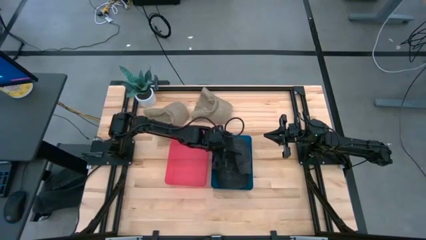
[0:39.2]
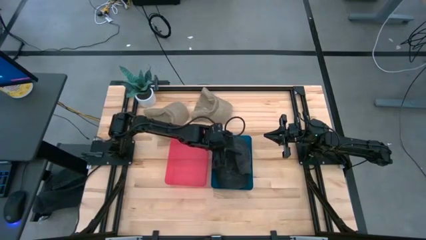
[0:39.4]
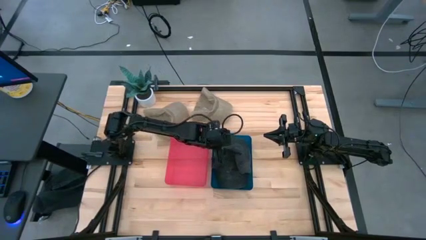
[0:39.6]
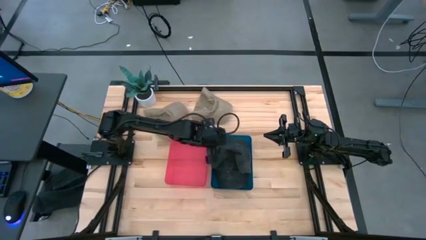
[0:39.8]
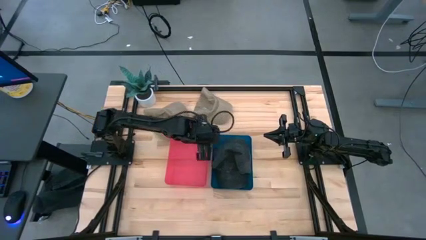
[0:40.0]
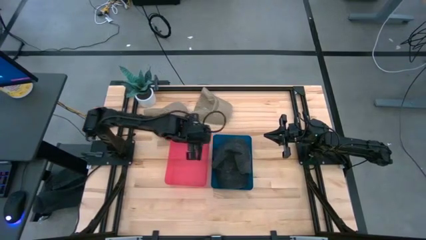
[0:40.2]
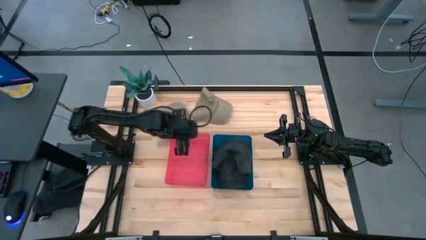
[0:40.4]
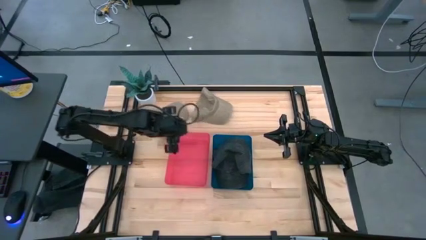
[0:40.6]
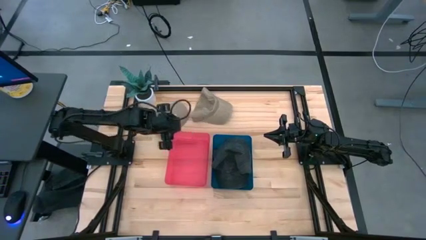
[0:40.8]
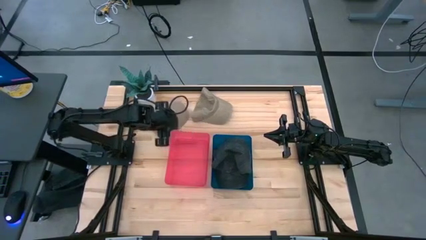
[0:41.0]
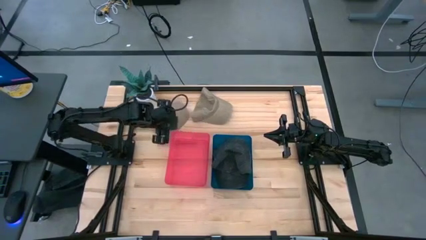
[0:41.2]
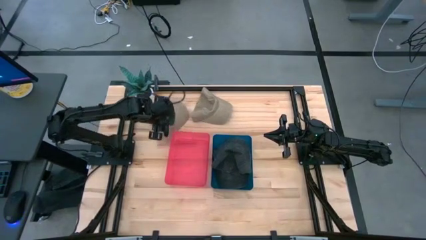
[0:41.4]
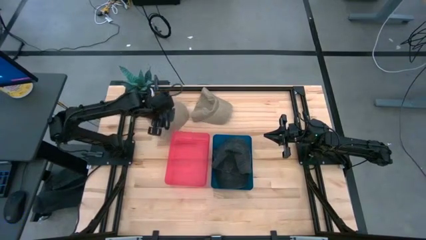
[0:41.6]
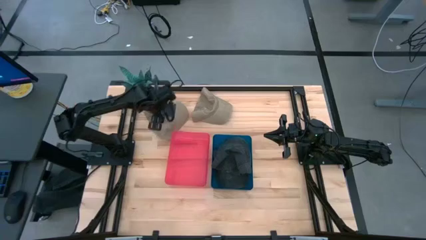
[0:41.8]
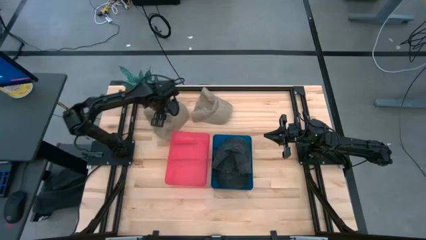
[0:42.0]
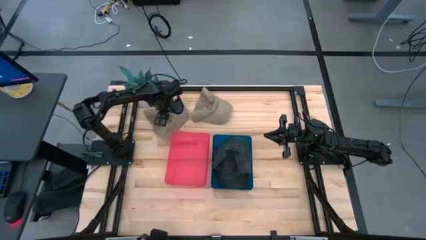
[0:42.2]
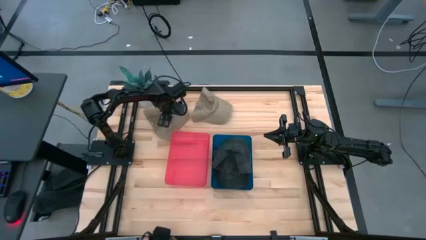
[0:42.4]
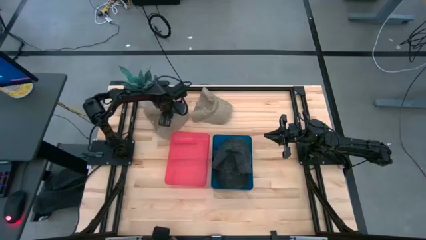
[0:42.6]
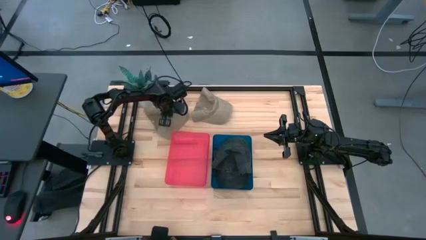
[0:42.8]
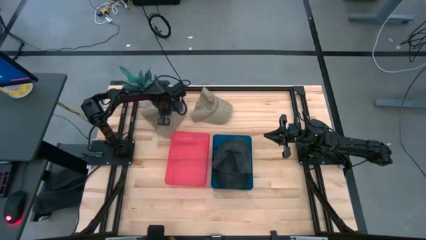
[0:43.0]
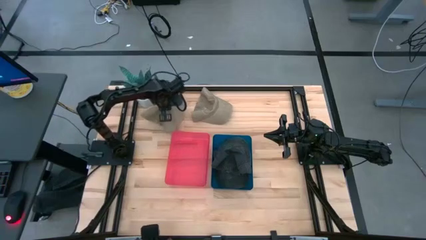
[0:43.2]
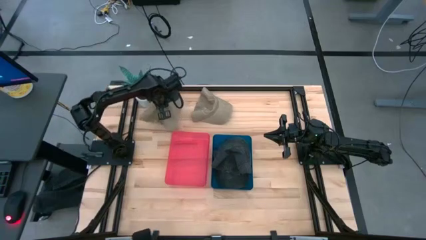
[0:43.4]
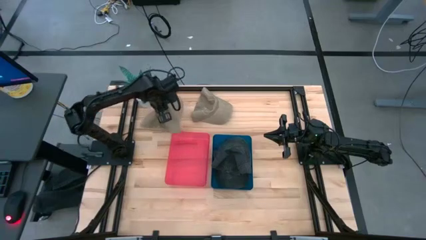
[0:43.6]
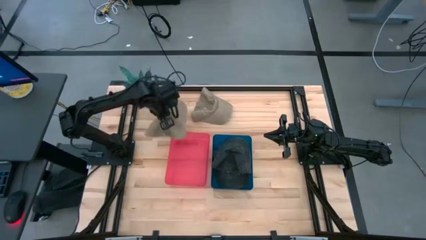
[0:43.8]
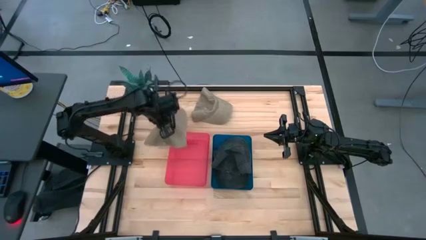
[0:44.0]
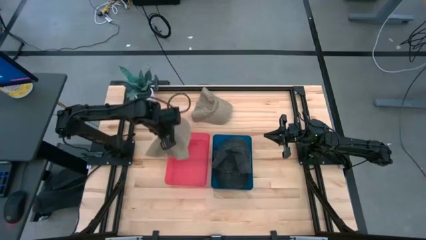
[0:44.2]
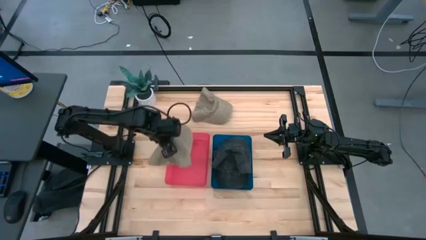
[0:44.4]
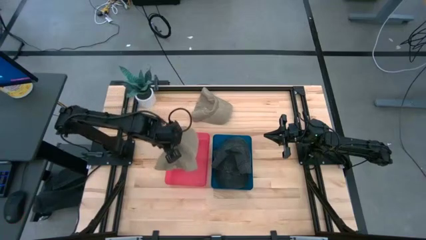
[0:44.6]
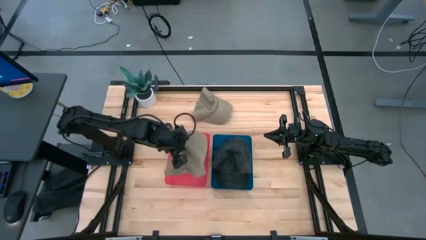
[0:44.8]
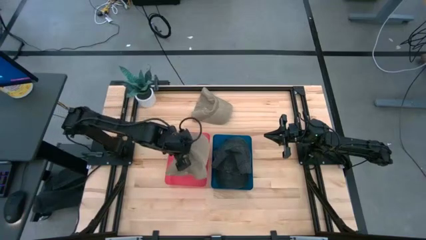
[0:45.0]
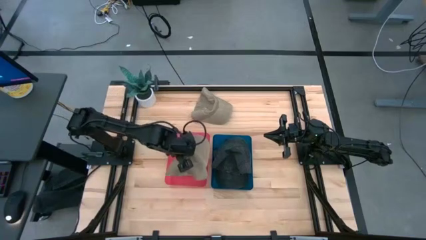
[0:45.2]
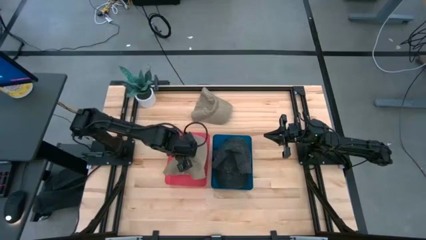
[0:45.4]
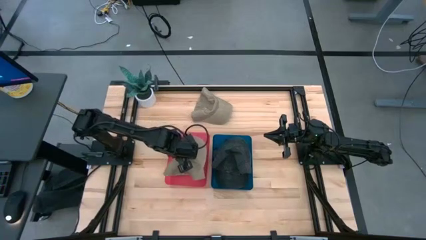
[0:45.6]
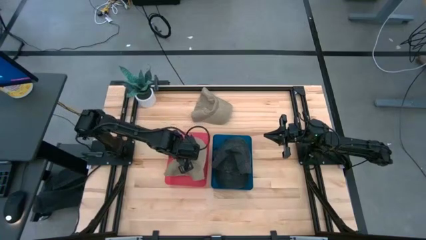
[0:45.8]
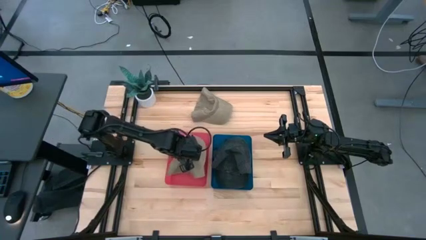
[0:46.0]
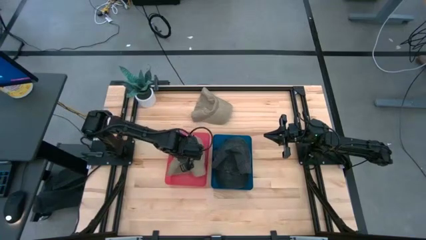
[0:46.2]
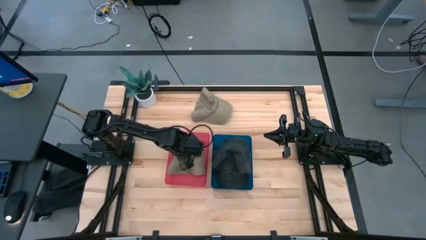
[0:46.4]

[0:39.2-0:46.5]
Task: Pick & Place hat
Put the left brown cap into the red bin

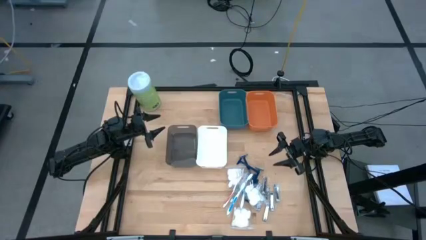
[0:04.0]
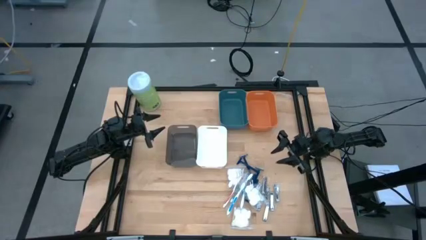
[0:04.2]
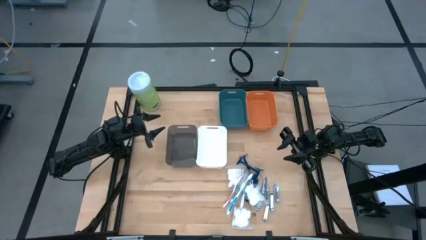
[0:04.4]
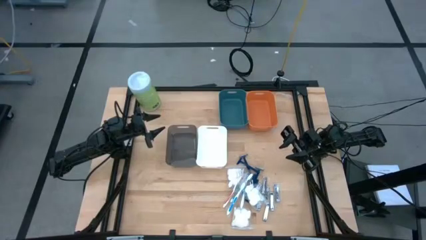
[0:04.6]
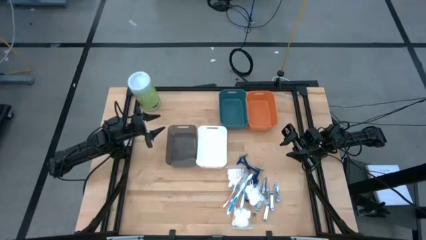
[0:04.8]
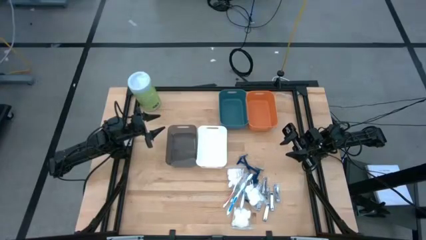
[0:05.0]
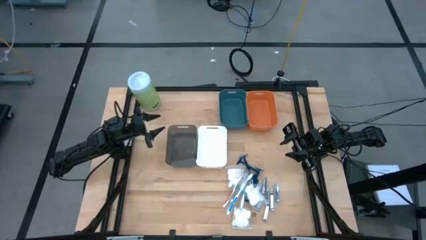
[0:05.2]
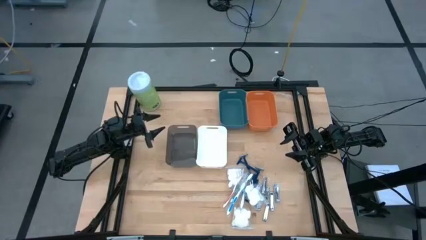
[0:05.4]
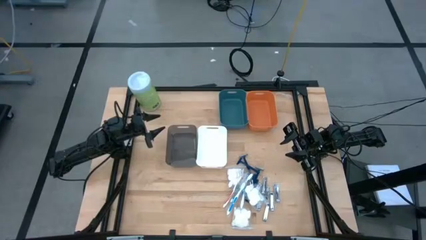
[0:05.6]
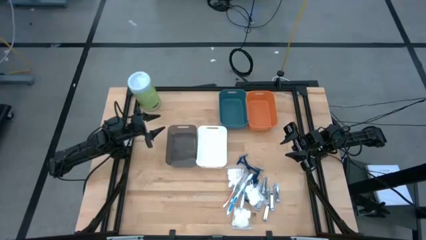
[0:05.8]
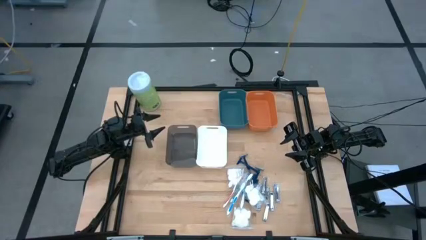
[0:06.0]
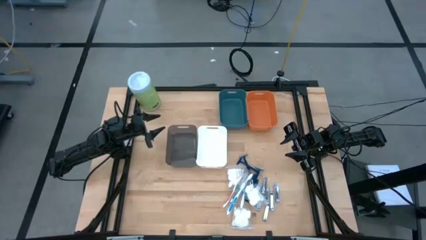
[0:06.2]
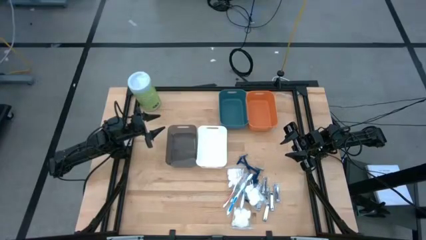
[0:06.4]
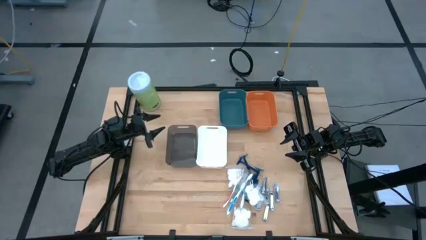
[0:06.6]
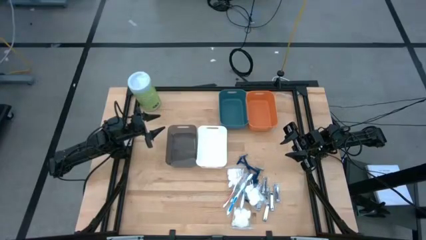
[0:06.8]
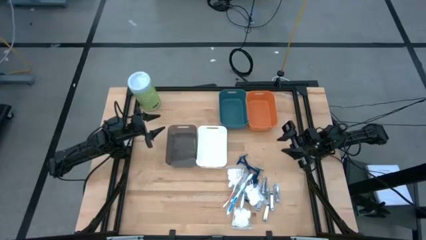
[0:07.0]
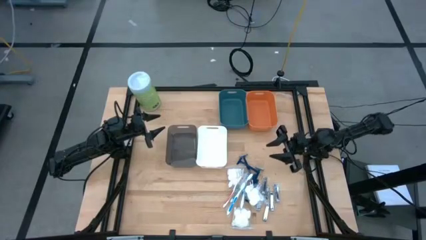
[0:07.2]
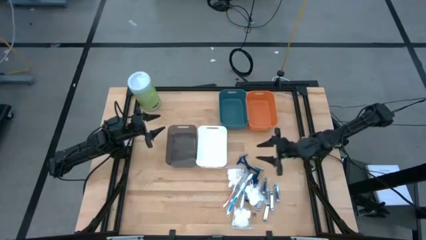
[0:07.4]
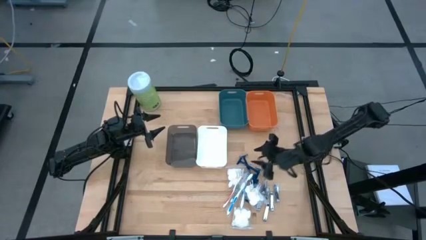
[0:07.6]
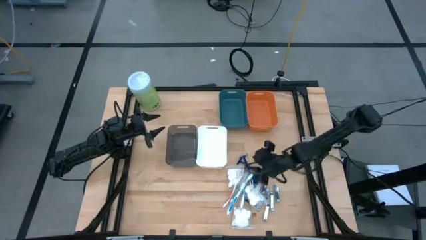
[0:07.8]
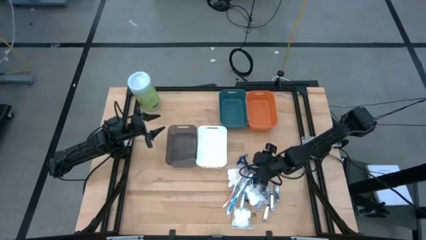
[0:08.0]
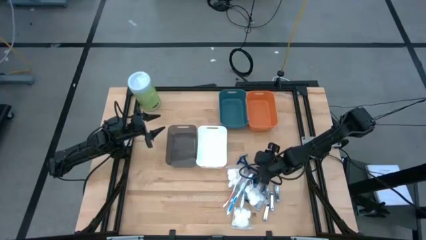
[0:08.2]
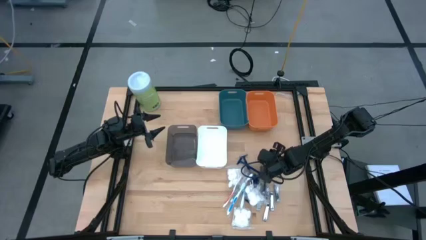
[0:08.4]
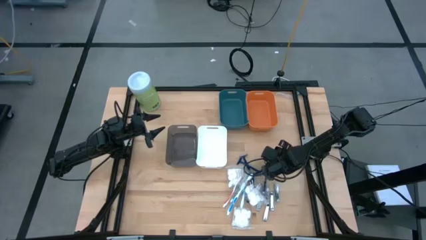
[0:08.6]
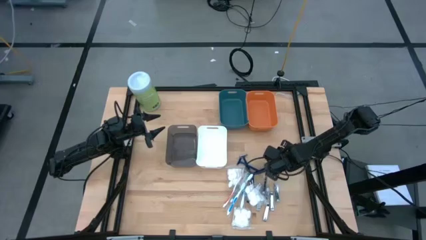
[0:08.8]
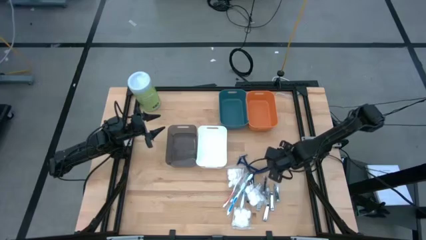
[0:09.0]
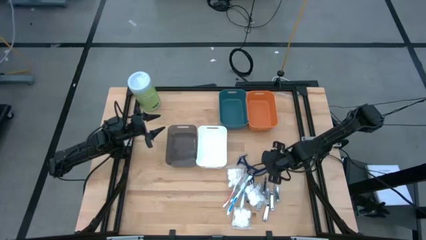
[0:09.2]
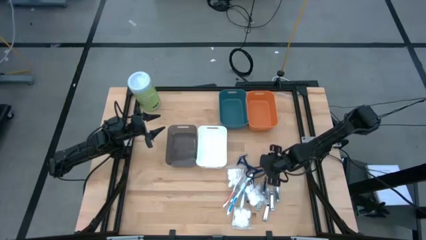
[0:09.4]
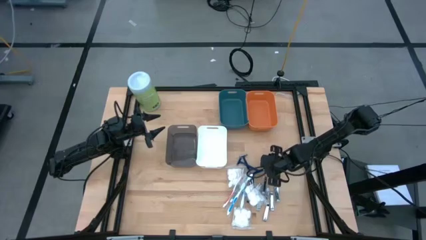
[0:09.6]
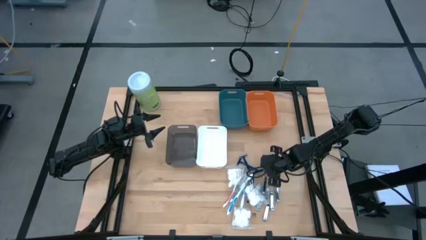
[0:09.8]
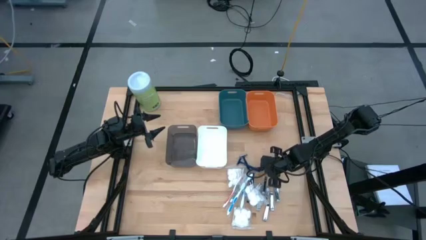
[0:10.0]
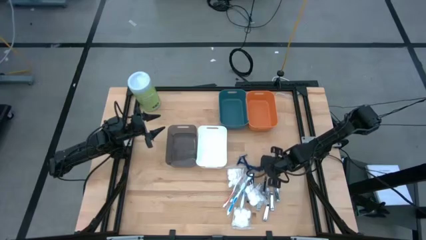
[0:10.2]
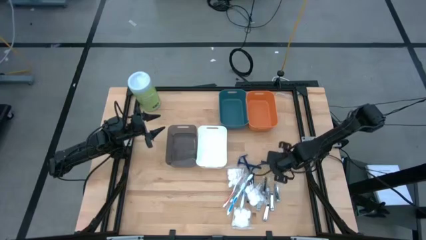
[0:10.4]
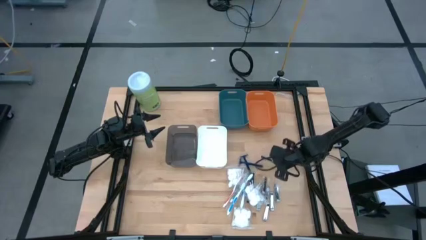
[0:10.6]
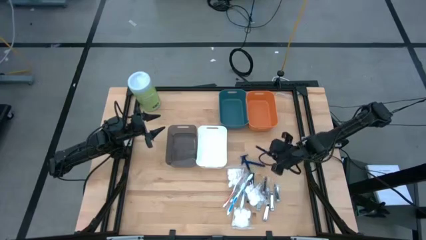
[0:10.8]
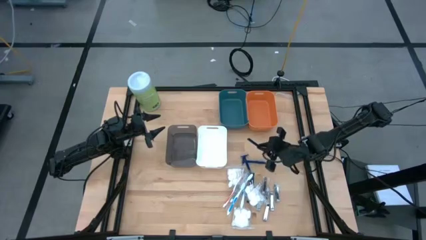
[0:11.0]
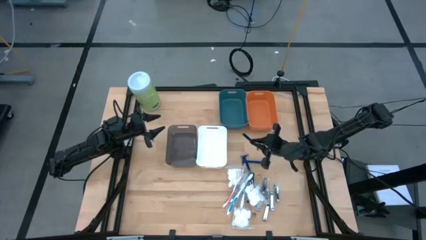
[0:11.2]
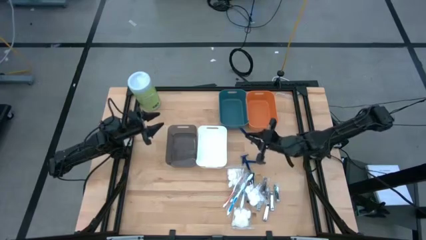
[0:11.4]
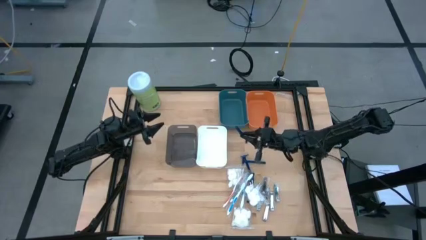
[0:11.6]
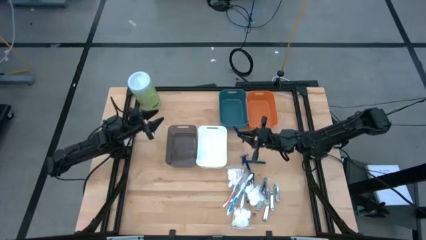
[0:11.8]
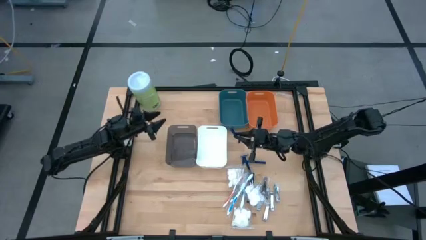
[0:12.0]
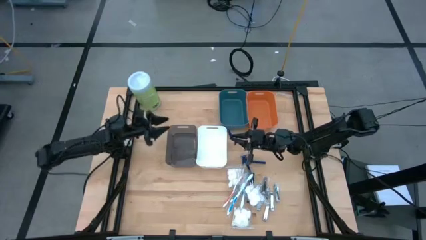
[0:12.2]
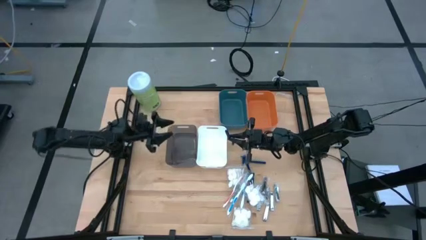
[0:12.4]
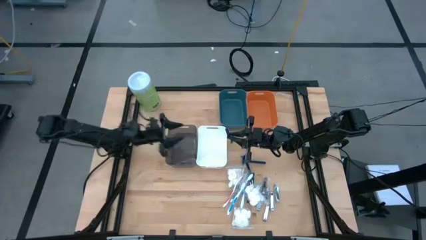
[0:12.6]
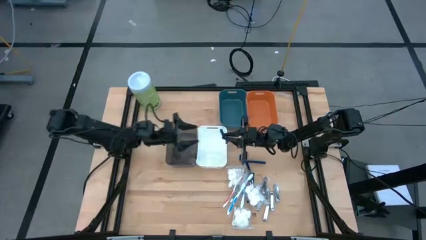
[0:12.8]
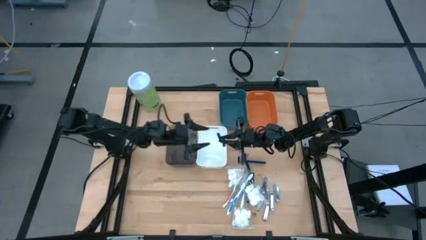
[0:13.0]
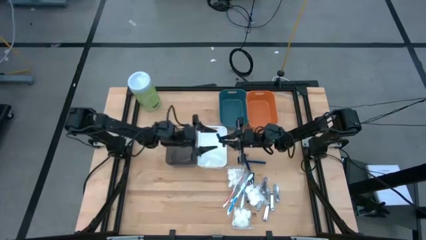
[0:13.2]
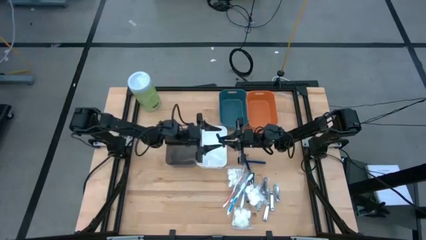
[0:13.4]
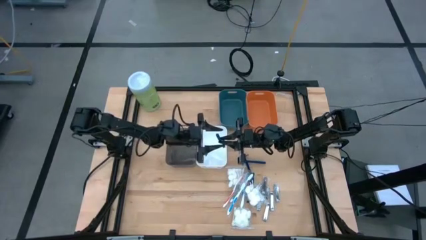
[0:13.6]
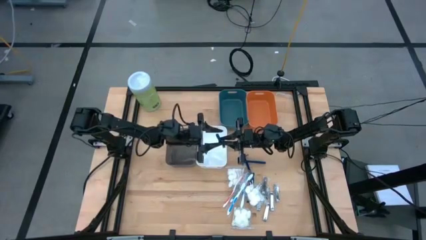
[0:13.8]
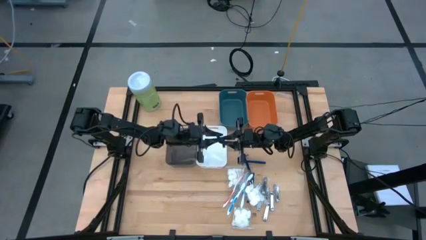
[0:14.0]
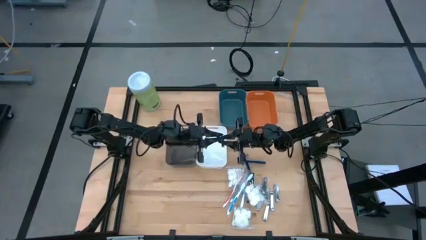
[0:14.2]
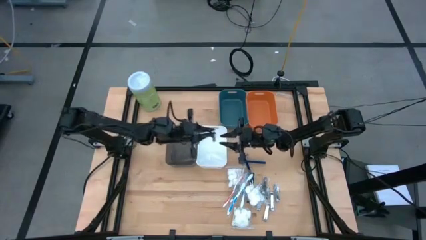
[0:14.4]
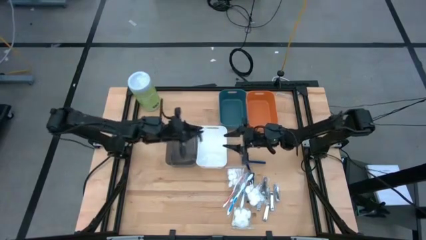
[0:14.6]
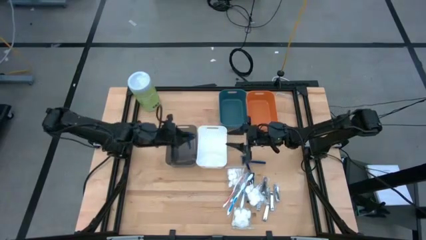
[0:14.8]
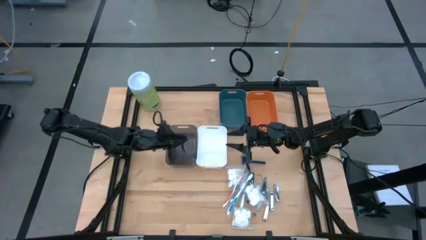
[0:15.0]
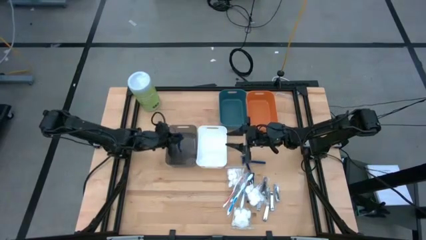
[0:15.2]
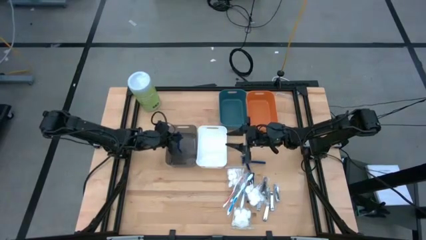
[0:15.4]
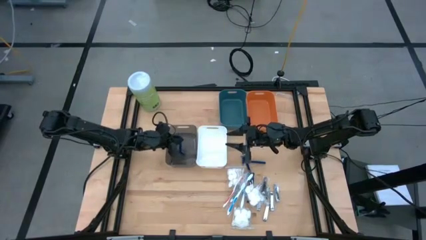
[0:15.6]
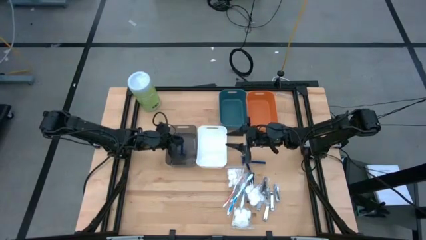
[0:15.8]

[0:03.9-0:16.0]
Task: Pick & Place Travel size toiletries
Put the blue razor into the black bin
